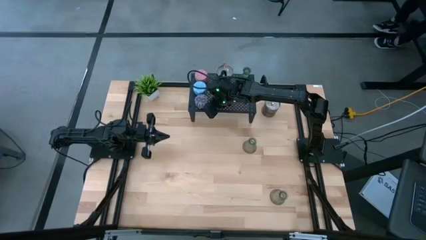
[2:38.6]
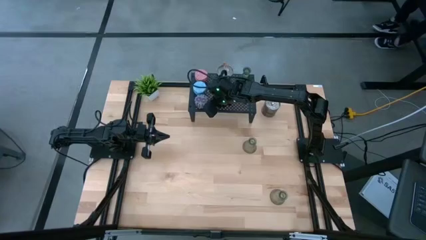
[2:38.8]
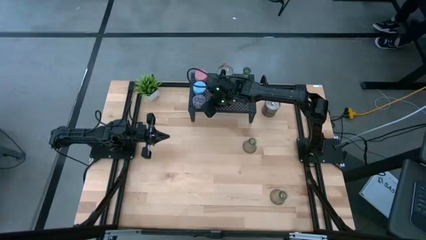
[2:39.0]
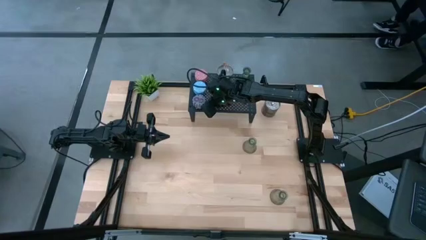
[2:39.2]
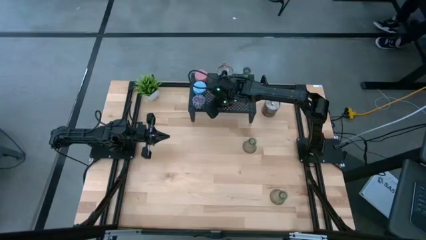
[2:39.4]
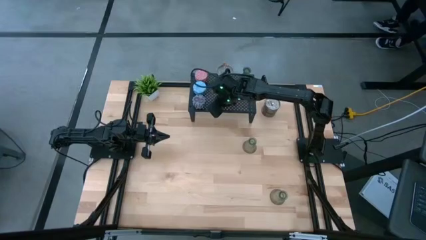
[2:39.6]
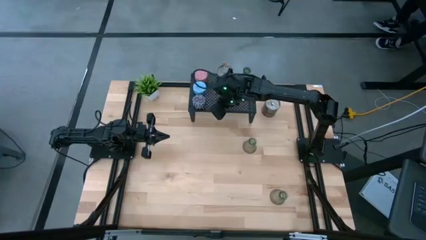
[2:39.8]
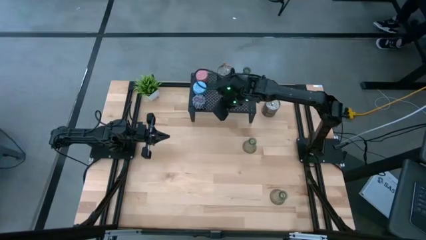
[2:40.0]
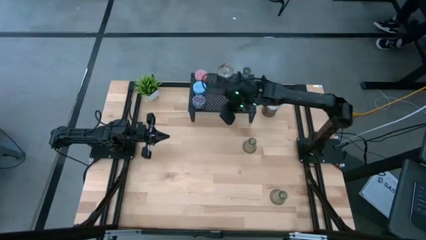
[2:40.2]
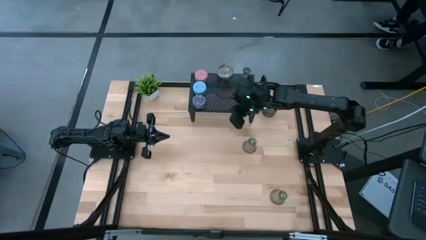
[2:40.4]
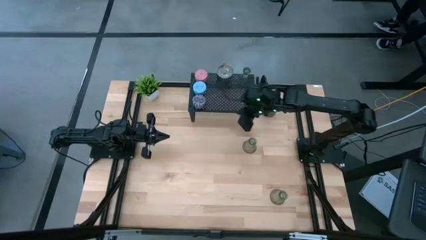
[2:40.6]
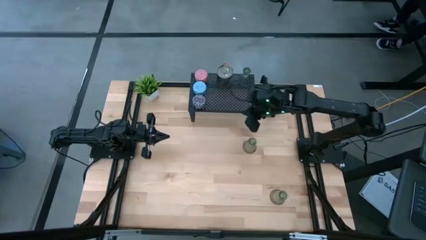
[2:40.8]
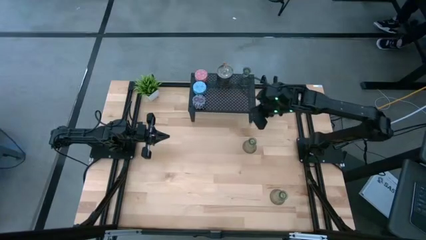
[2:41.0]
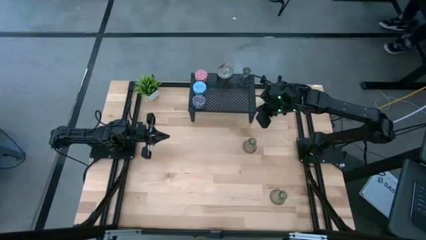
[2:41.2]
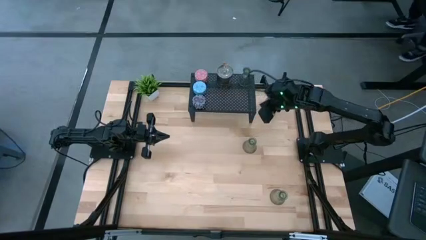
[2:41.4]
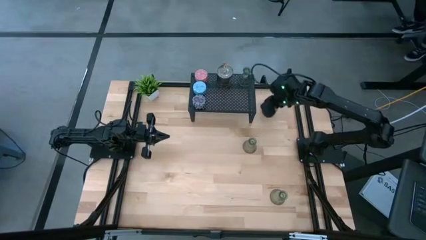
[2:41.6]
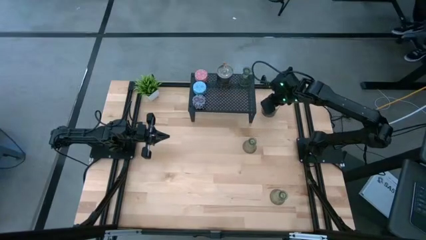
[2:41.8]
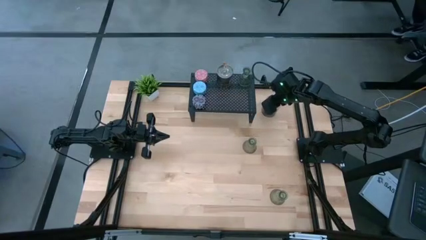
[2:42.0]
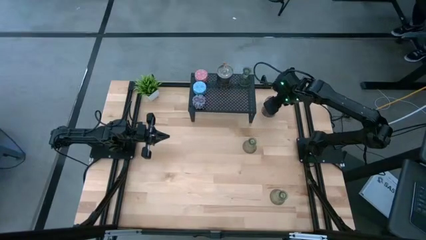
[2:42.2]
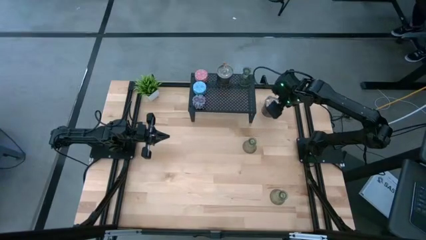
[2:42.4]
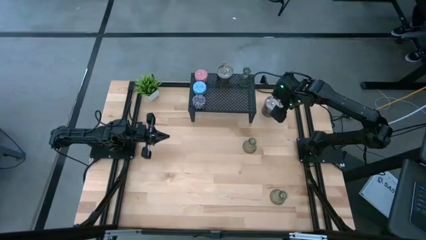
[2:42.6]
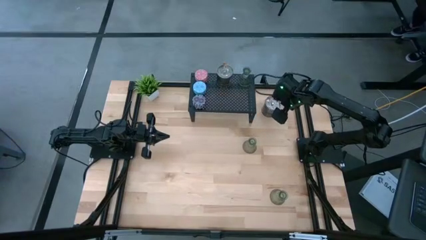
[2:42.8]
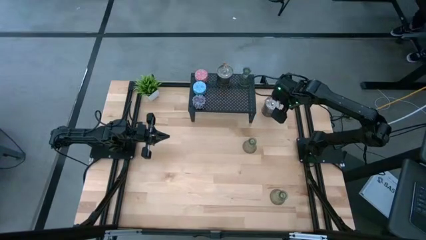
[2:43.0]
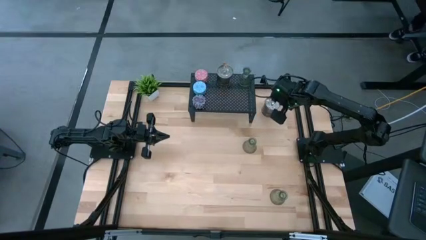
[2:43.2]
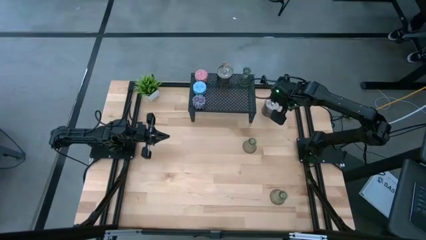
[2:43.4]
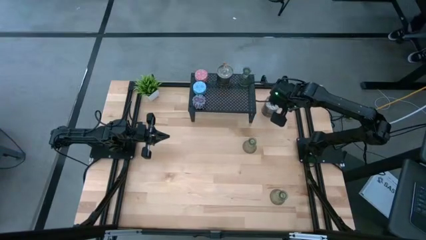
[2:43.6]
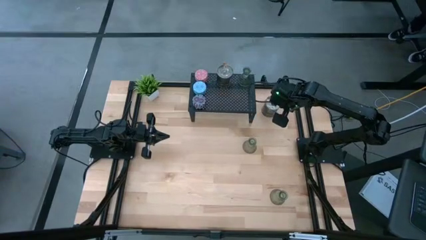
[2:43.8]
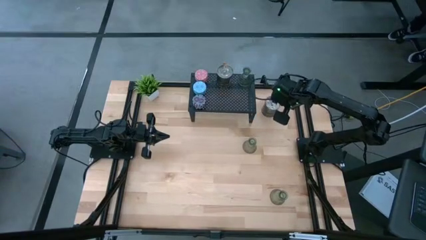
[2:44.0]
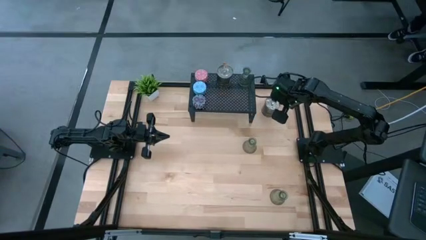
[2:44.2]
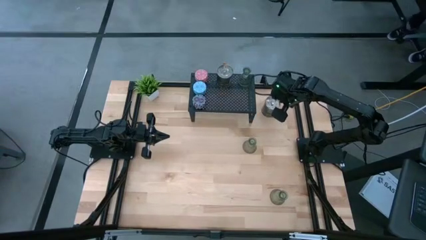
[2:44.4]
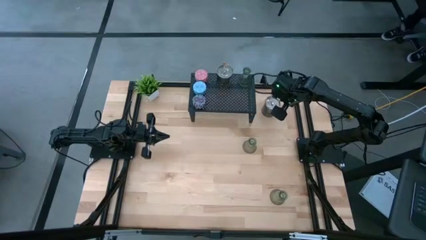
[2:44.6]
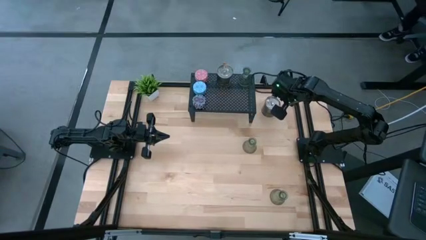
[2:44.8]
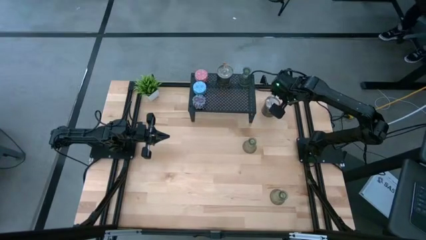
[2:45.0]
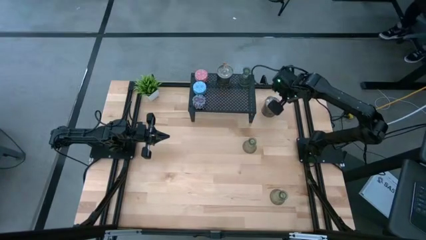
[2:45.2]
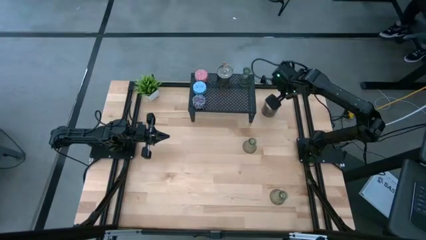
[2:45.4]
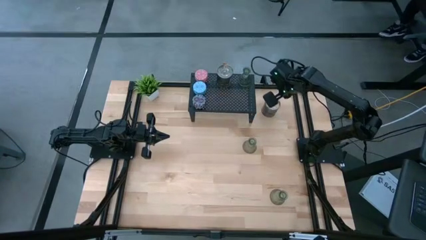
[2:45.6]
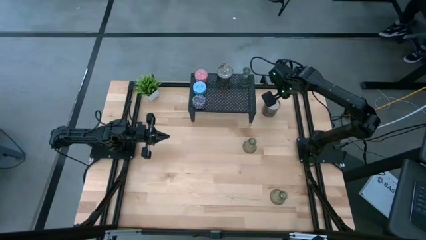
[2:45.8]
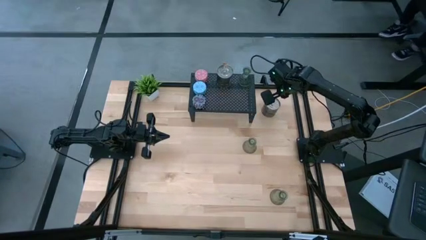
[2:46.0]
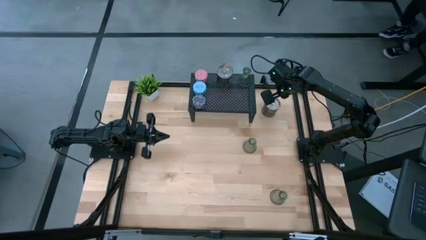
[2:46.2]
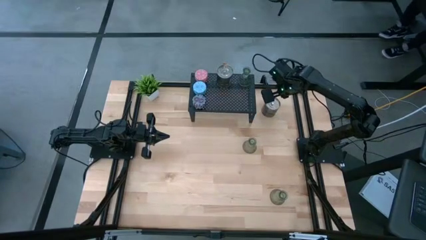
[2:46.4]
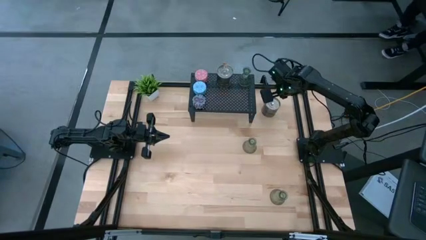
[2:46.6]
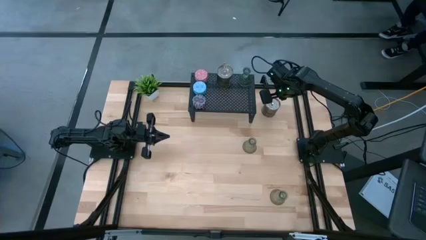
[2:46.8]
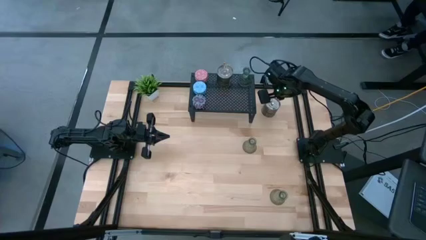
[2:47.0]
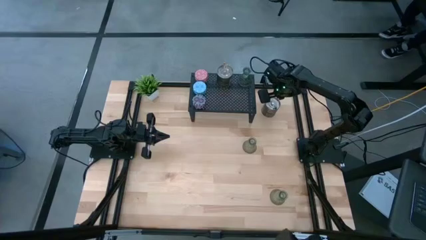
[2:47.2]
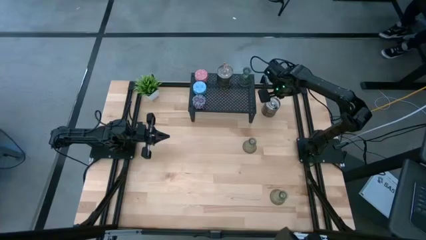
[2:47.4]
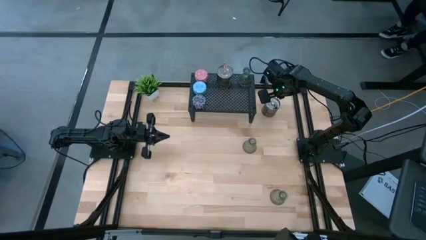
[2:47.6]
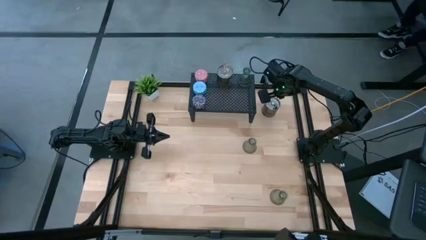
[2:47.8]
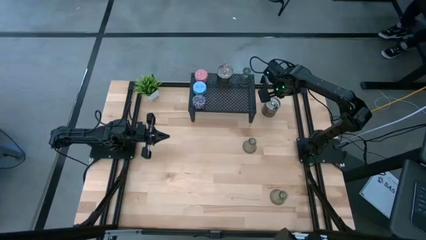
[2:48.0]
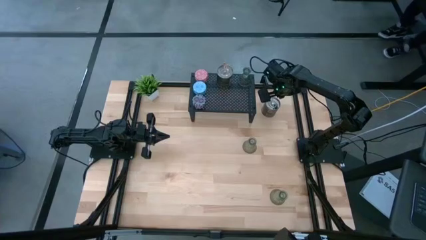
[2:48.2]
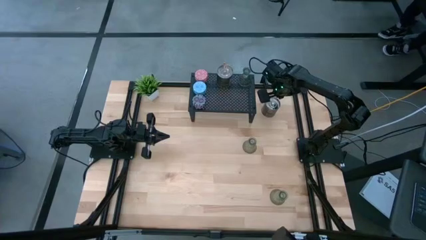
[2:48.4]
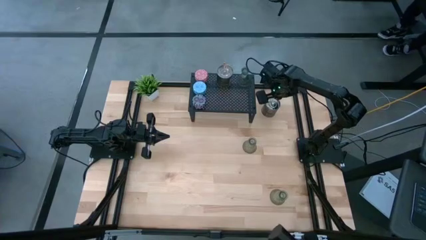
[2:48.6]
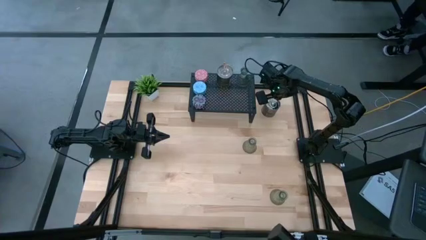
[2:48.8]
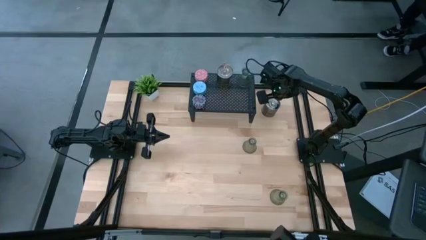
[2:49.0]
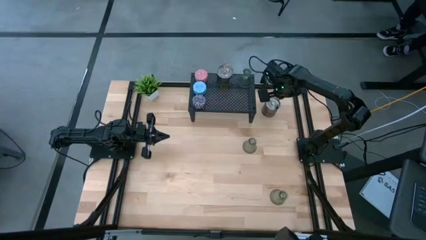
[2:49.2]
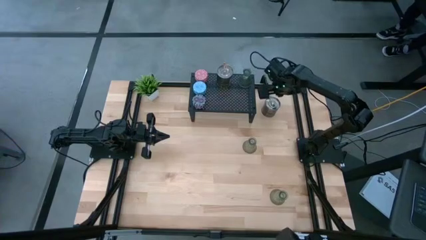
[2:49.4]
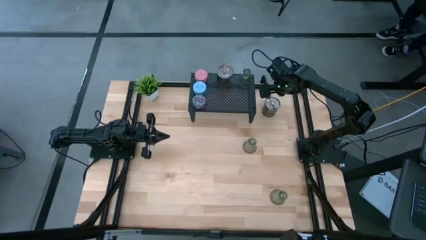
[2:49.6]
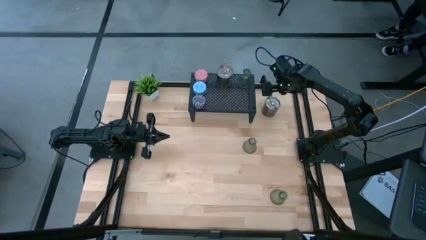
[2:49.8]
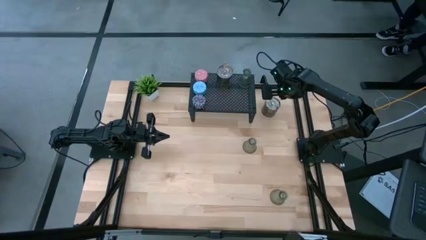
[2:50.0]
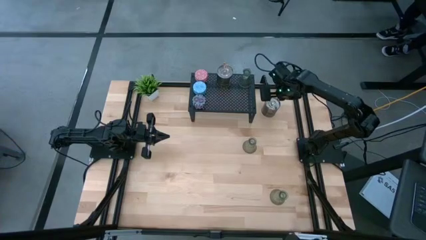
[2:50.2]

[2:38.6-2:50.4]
Task: Pick & Place candle stick holders
Put the silver scented candle on the shelf
